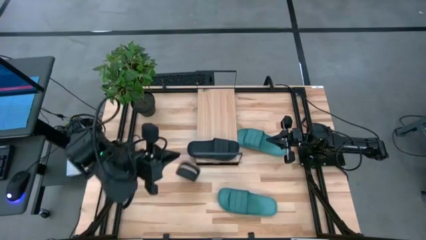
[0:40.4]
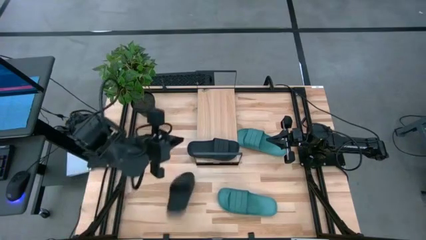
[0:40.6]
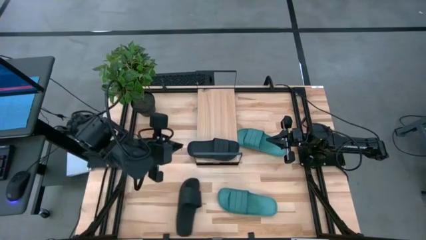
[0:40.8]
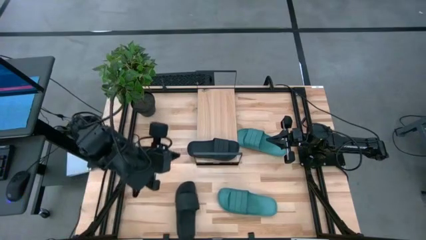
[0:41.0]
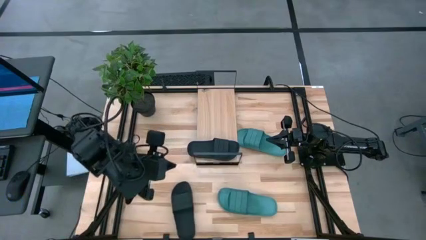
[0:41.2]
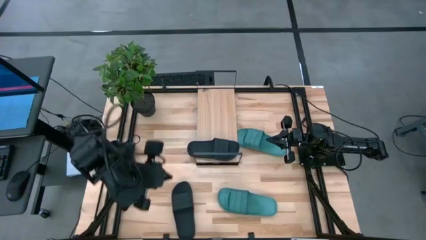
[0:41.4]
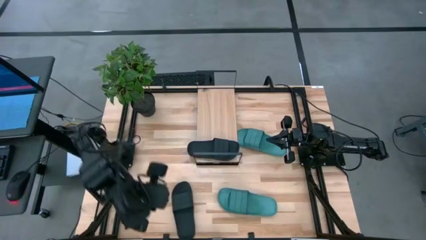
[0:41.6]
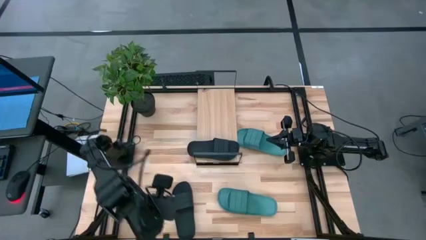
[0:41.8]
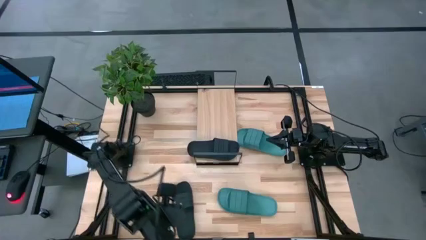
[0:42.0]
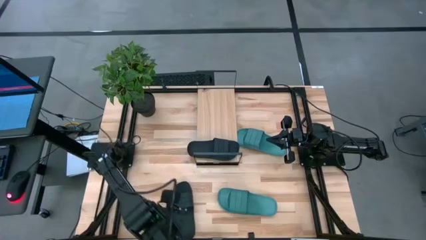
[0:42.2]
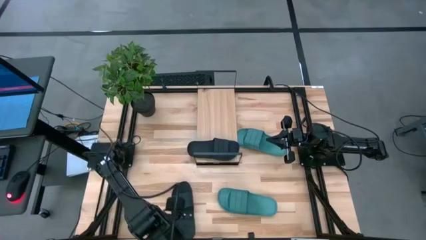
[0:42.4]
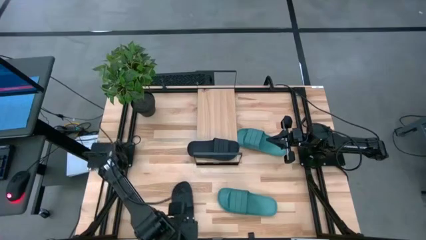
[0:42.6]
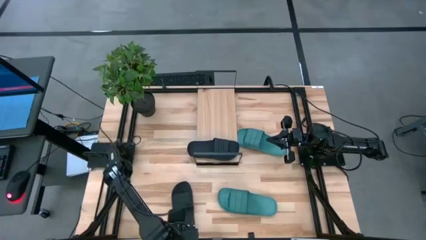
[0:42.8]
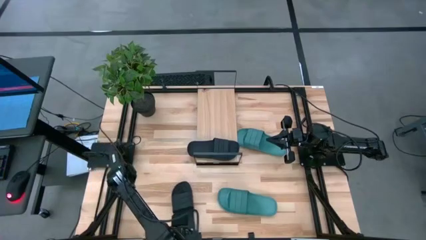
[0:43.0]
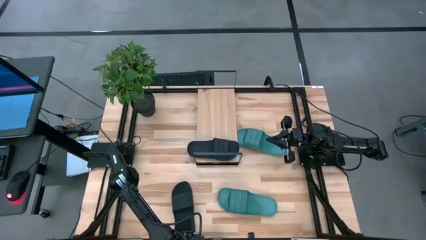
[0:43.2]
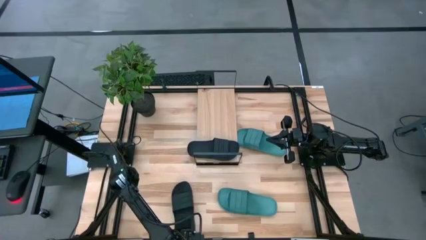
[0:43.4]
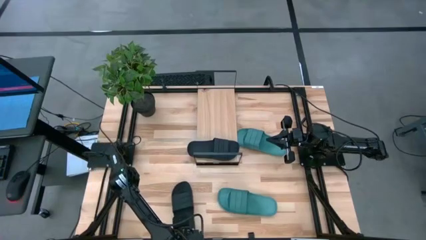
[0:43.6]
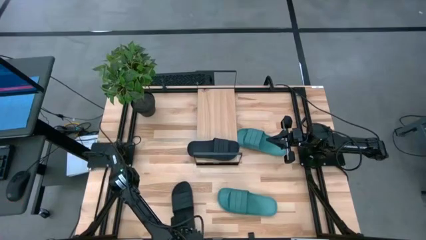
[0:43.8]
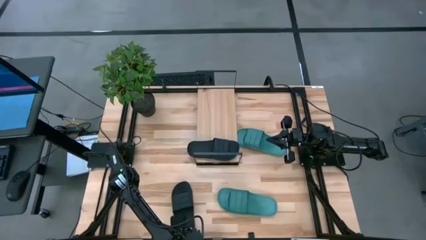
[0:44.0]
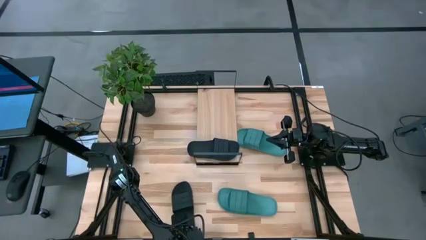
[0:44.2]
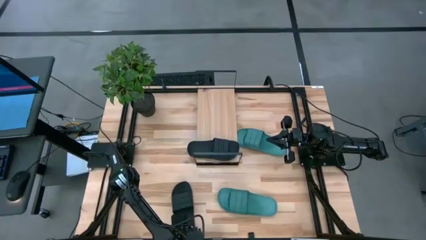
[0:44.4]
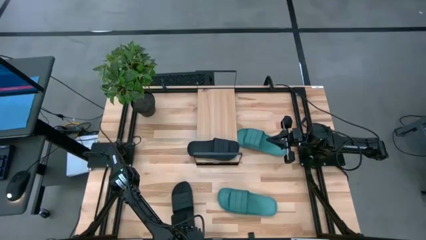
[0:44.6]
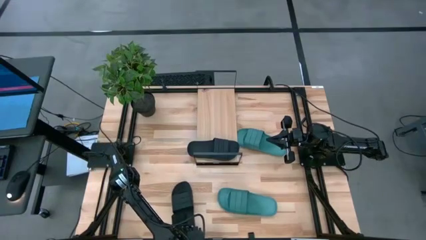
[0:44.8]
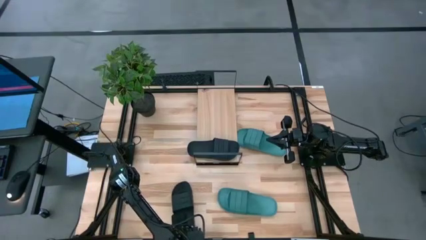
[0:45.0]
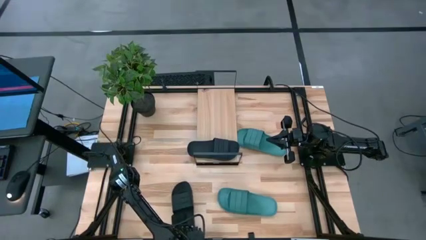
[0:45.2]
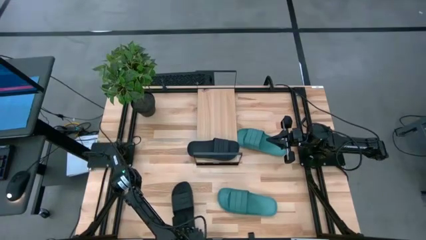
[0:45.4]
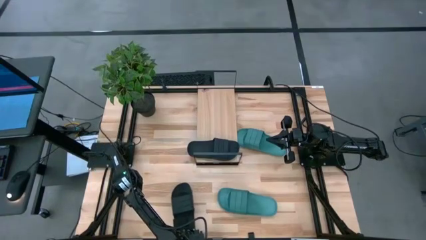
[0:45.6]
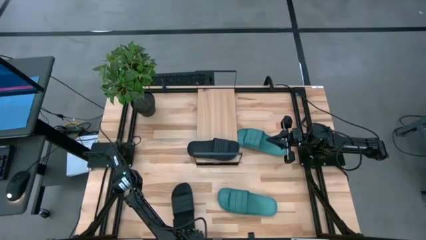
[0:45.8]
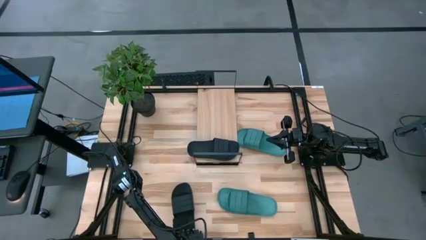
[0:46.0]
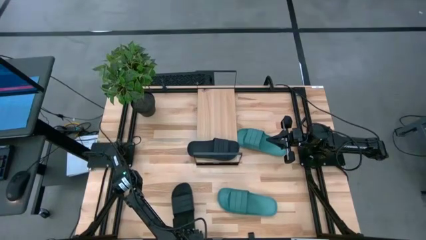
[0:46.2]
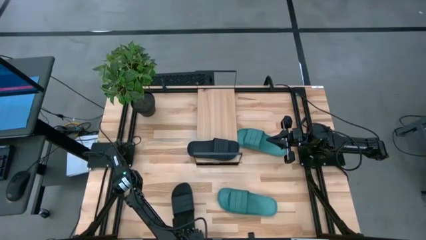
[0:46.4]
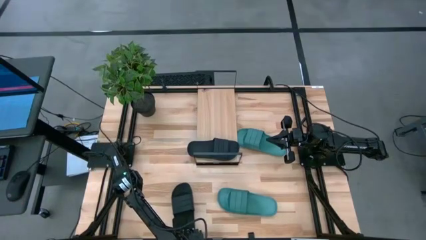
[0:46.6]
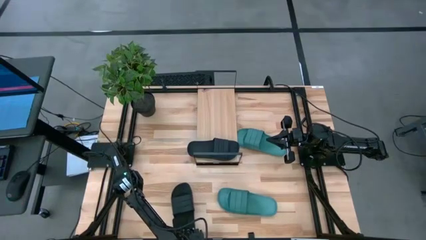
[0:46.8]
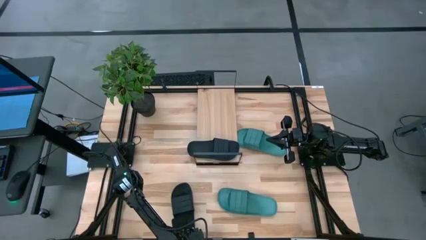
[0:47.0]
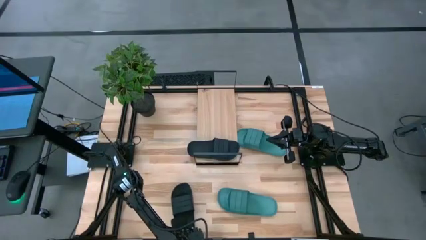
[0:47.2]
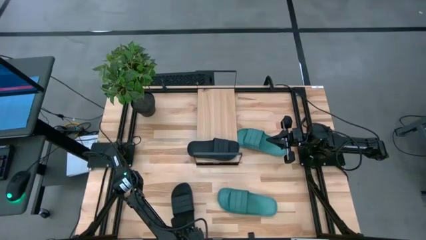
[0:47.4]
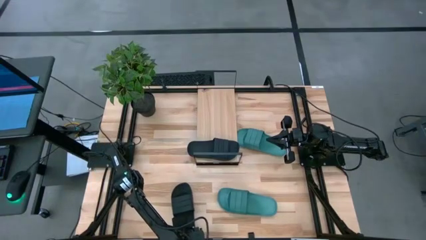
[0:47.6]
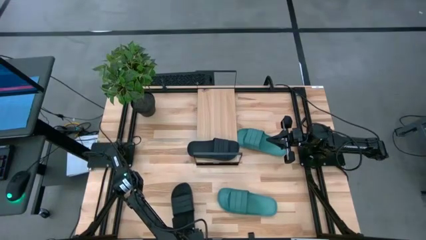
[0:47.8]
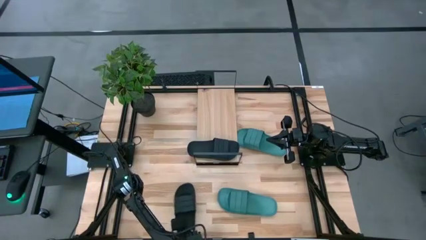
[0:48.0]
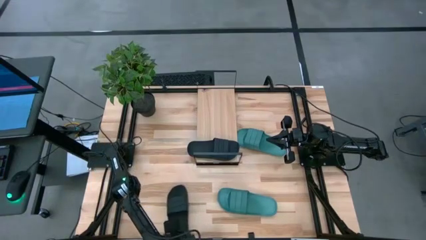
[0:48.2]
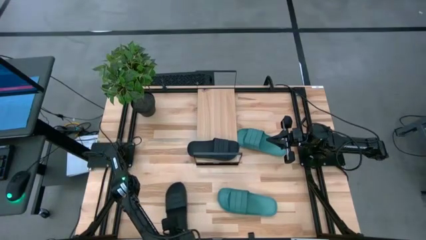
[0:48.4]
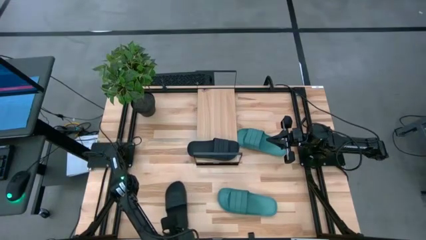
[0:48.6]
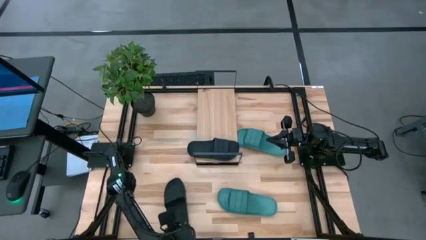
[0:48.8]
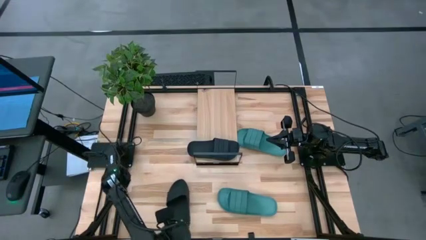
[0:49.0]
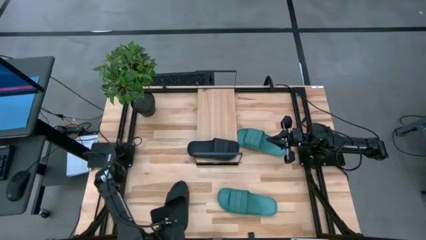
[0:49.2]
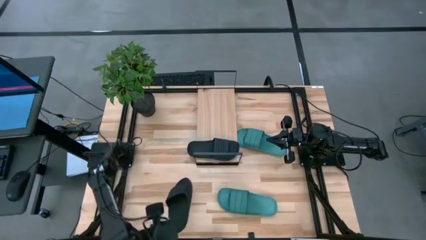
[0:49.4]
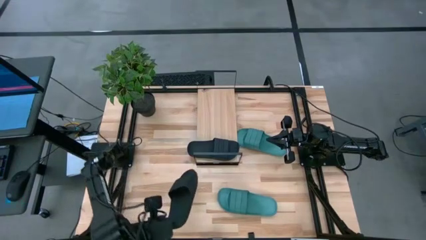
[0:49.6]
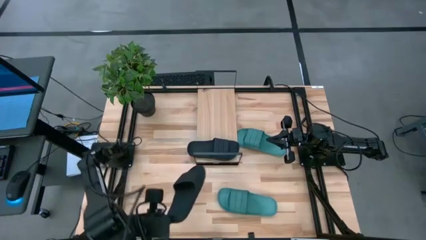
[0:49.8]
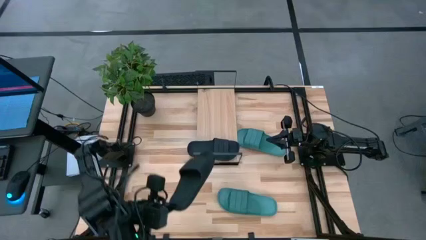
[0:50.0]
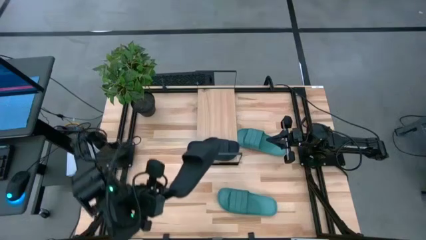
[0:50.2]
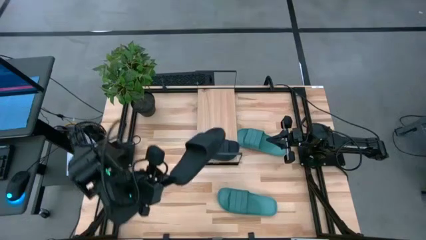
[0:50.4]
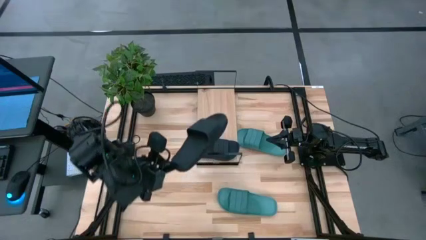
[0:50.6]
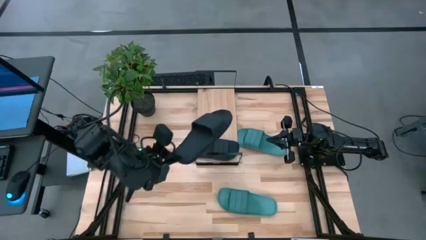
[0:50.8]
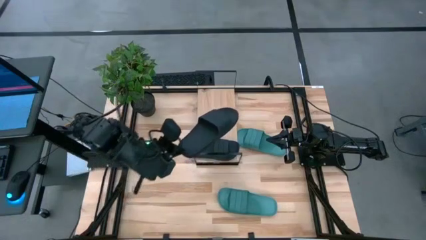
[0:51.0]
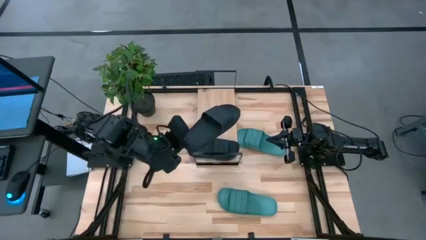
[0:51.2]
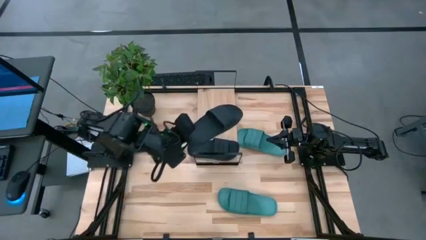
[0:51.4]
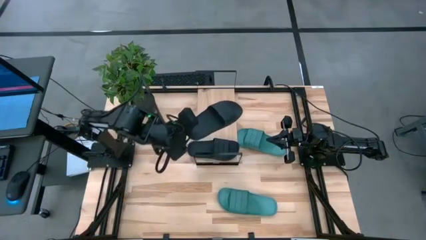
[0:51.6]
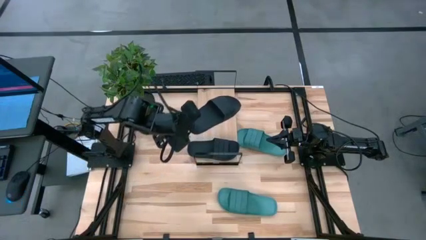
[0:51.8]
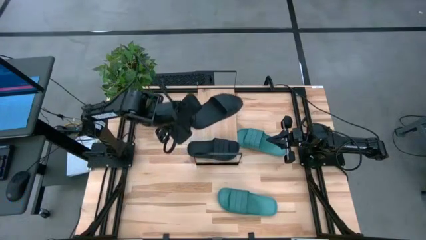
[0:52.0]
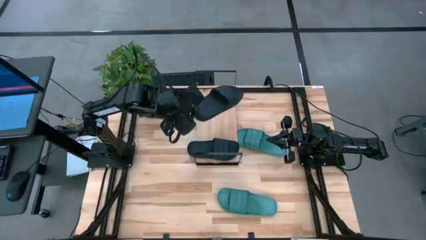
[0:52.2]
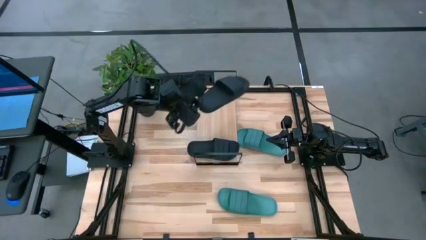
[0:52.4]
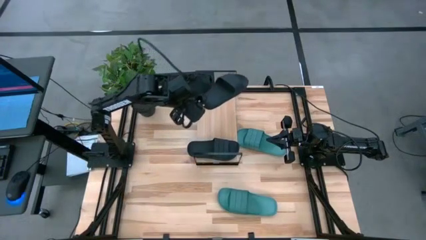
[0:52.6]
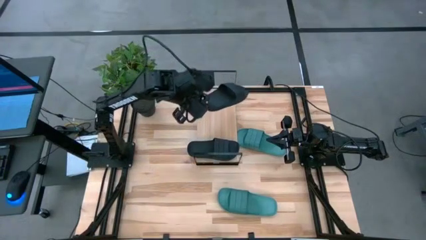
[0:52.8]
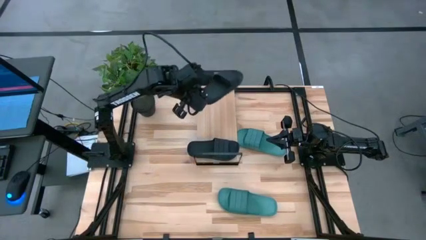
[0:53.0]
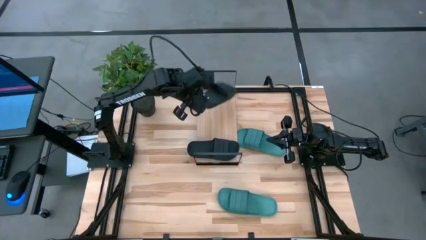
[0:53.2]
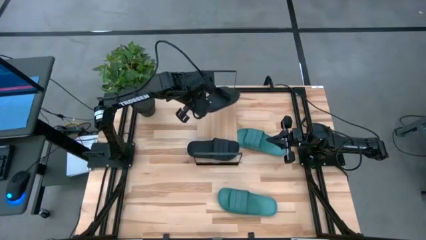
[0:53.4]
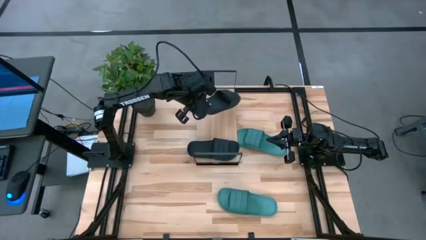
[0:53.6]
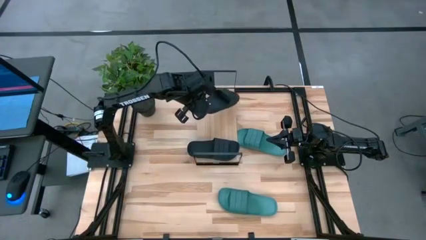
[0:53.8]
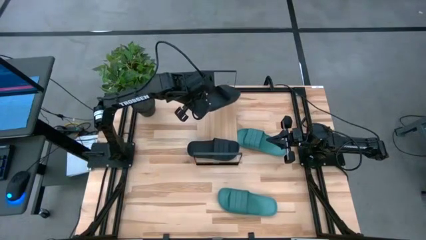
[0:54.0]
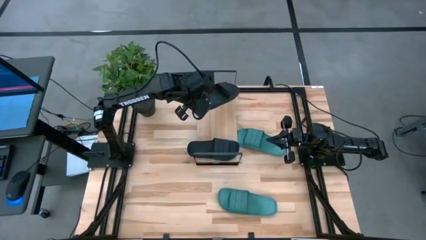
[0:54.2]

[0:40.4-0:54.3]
Task: Pick and place slides into the shelf
Put the black slide on the shelf

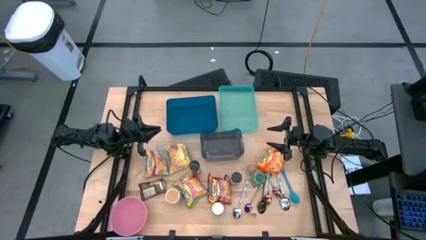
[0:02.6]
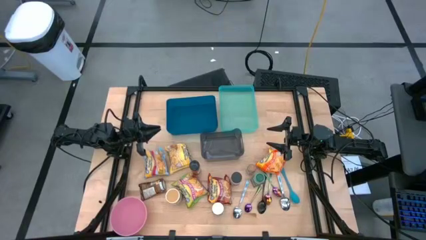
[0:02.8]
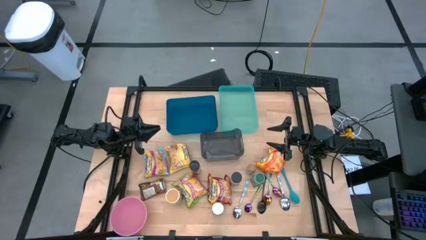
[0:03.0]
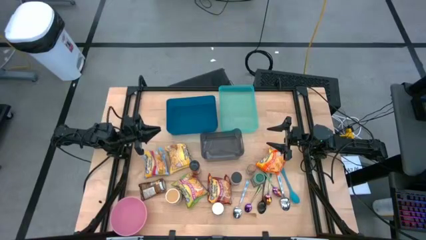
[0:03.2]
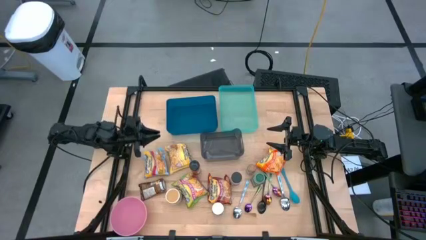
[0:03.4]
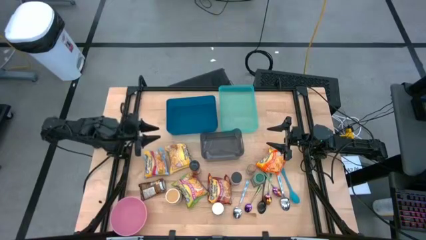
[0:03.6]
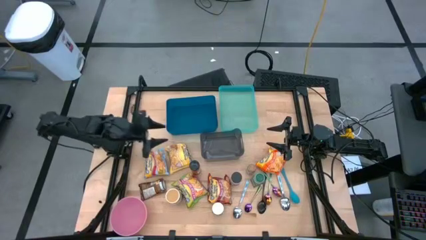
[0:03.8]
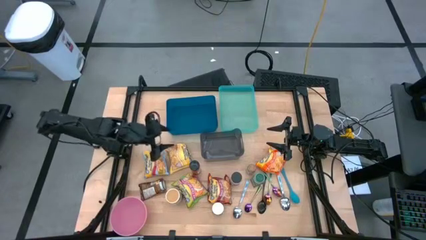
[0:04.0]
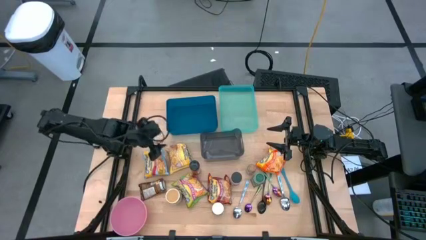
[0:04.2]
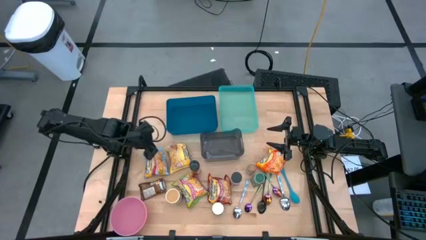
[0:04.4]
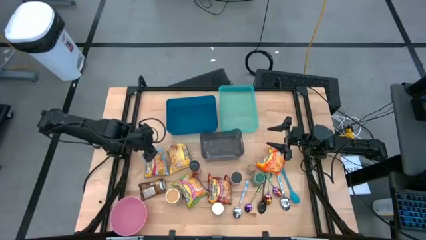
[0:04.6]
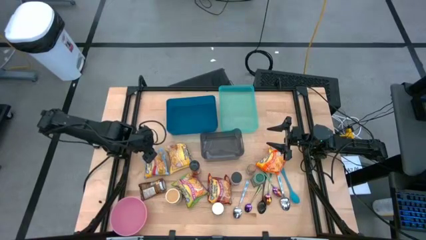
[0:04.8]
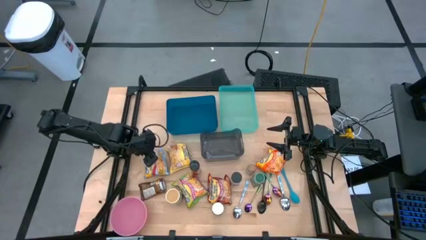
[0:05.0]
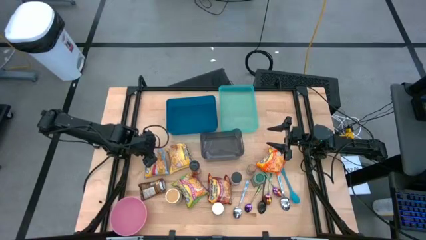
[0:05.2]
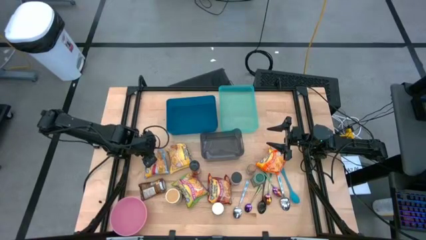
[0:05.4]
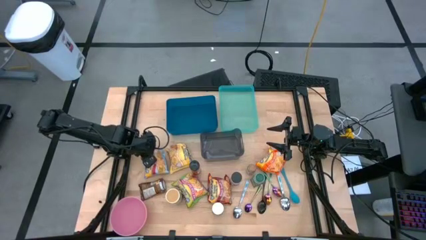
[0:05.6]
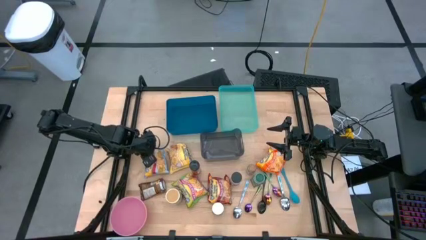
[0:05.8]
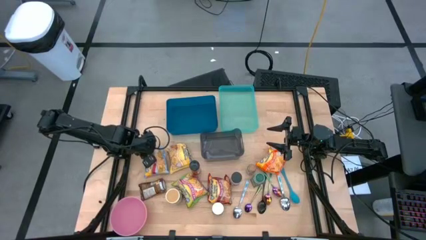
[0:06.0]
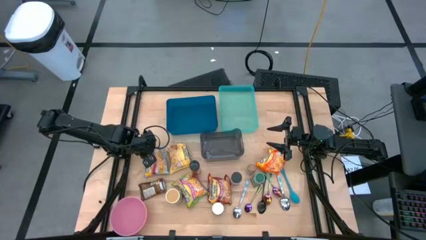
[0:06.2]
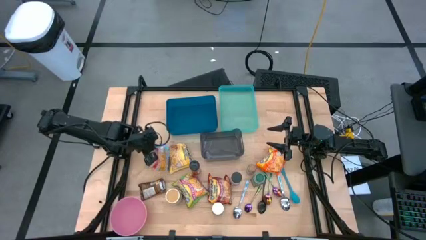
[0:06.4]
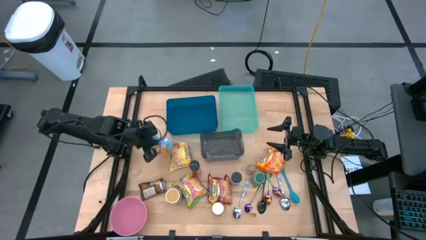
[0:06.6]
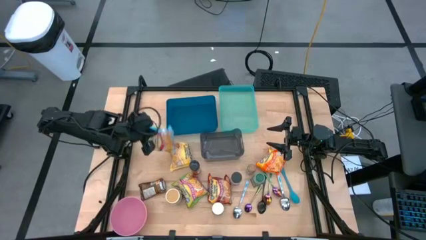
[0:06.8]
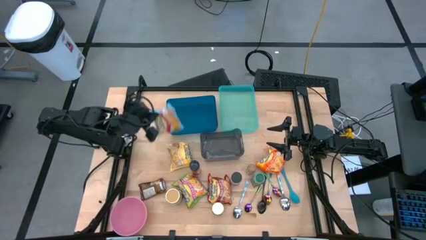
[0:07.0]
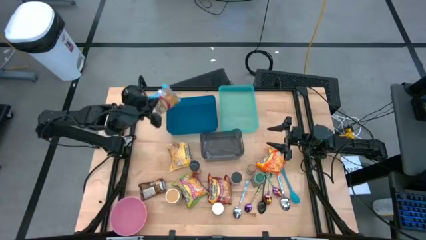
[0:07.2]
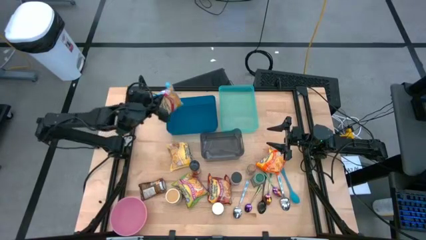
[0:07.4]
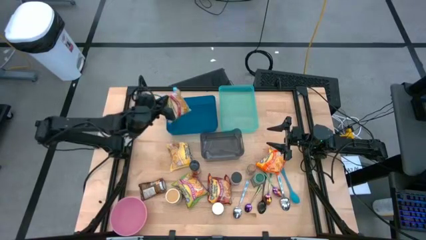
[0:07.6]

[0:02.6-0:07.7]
Task: Pick & Place Food Item
Put the light blue noodle pack into the blue bin
